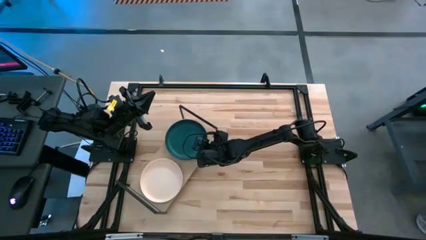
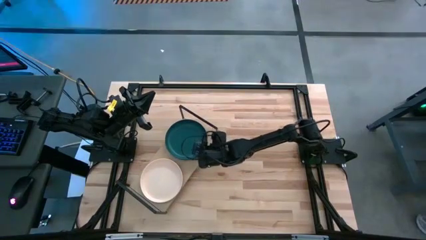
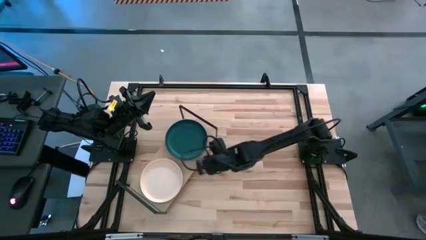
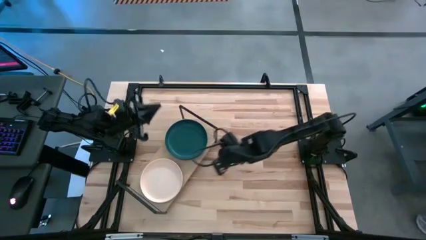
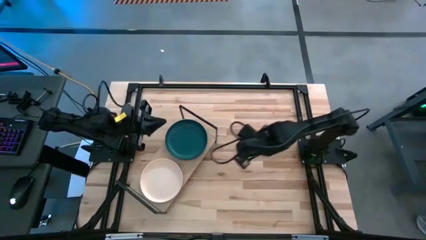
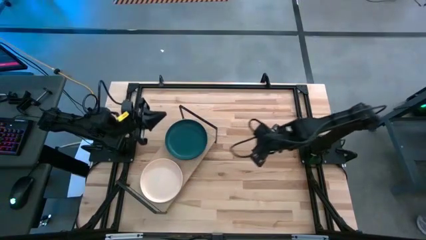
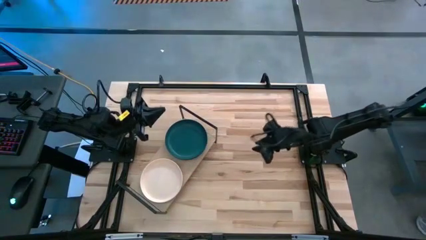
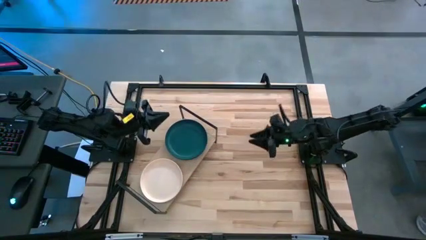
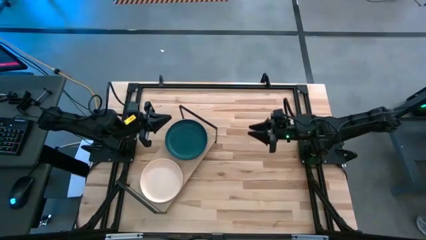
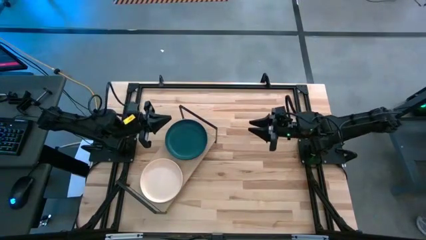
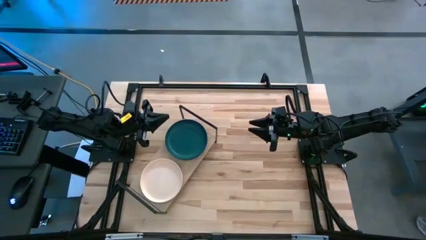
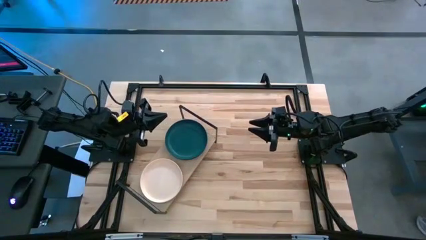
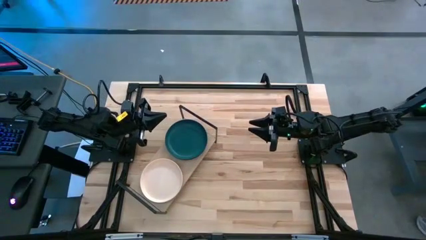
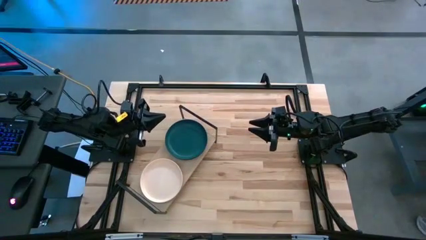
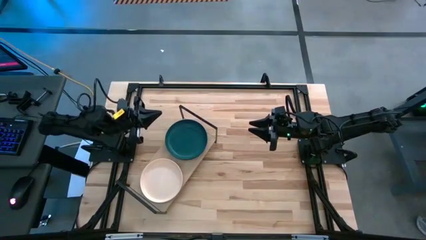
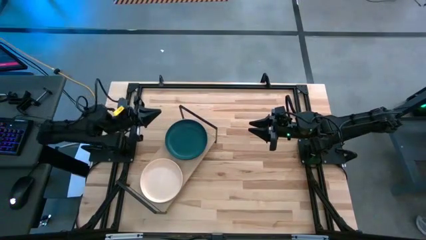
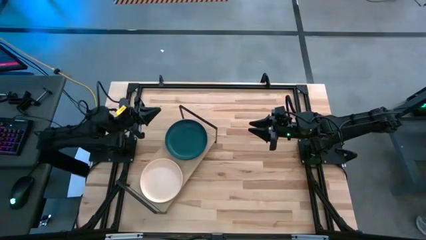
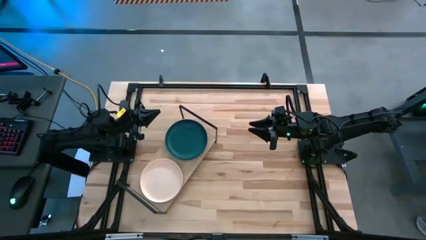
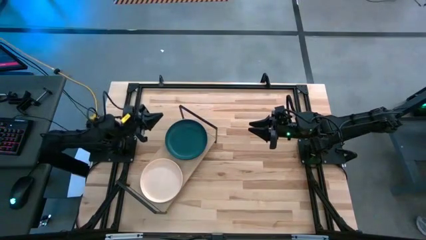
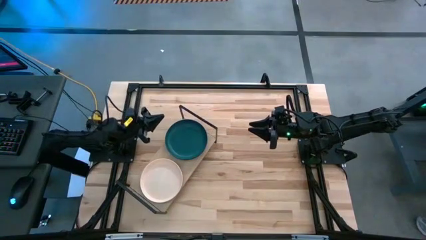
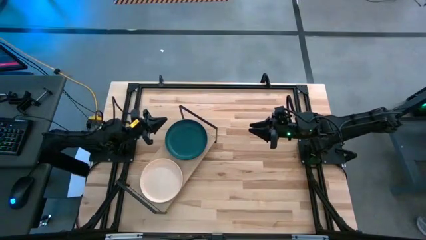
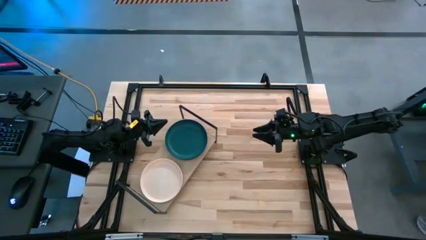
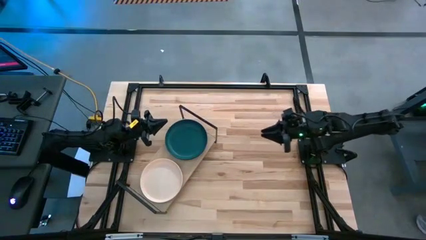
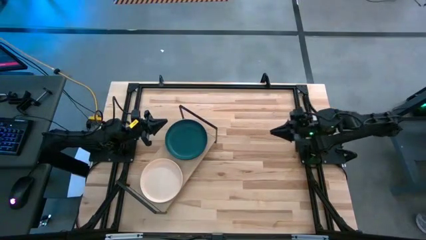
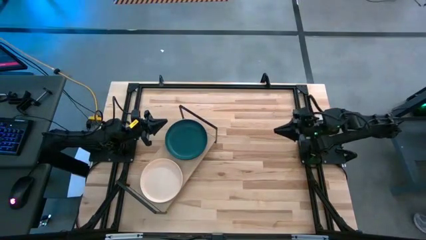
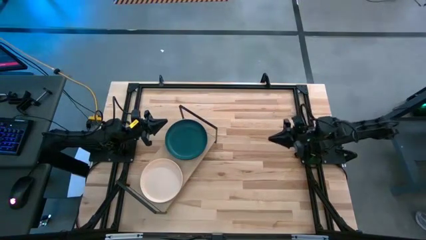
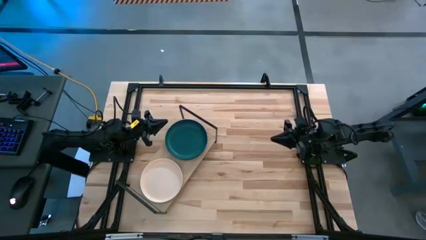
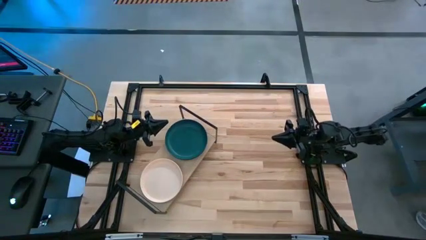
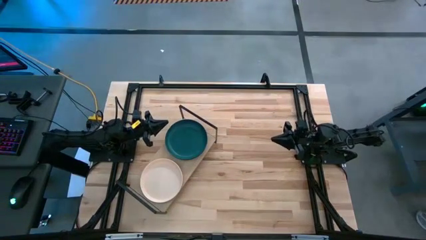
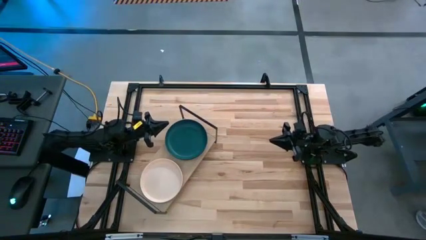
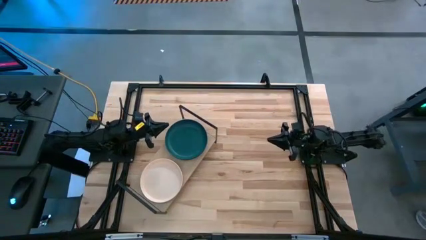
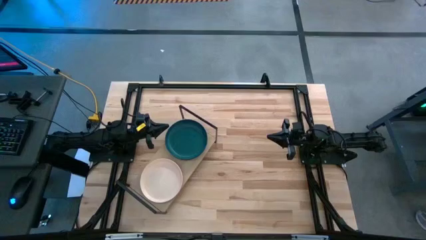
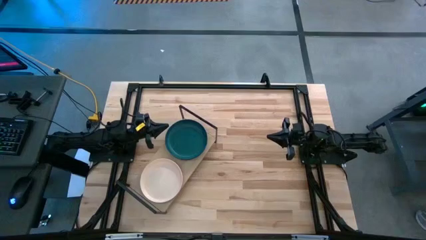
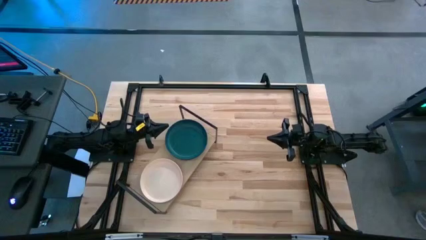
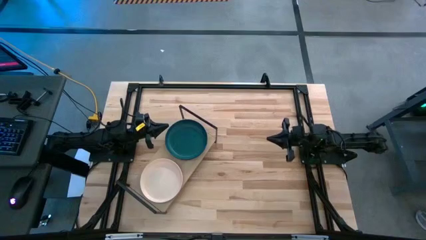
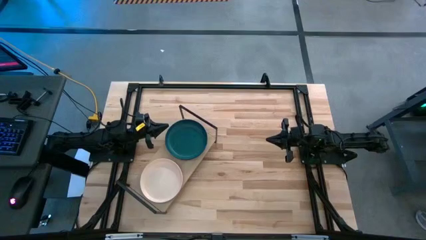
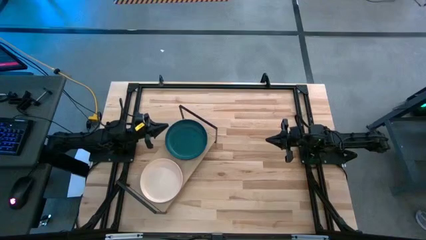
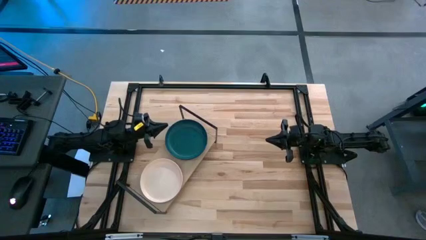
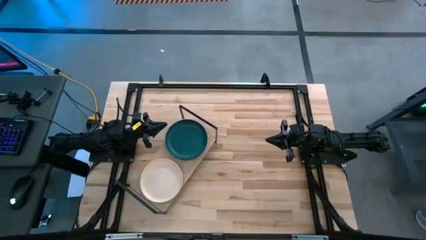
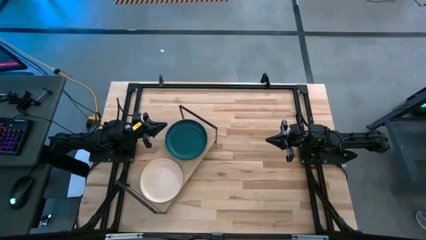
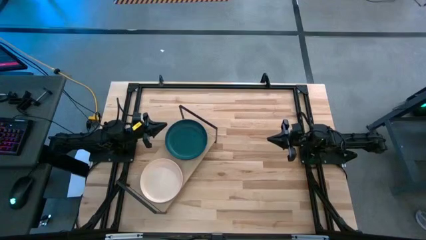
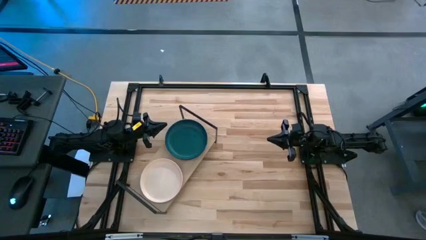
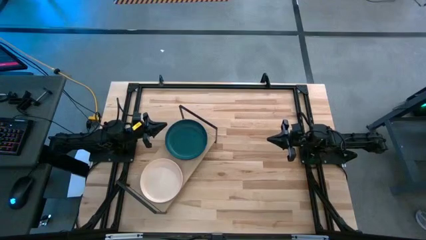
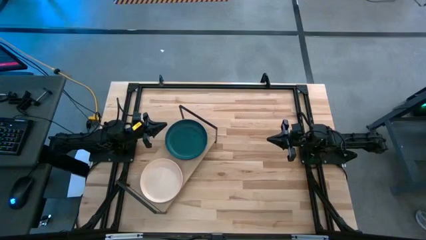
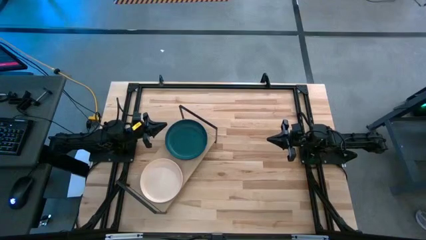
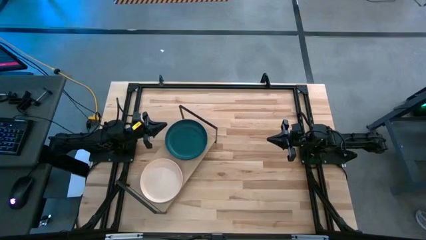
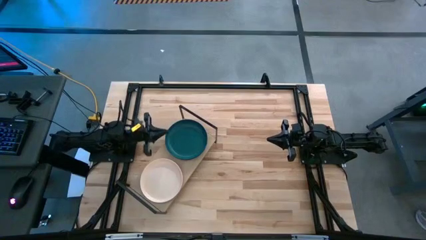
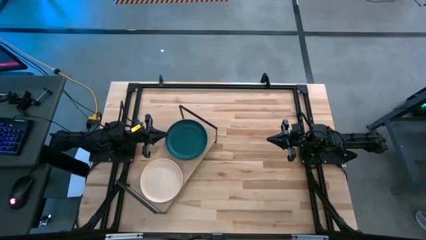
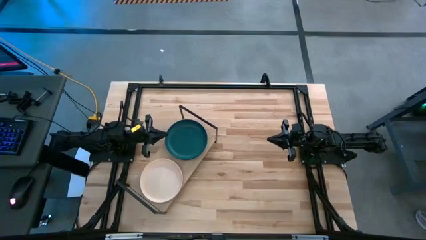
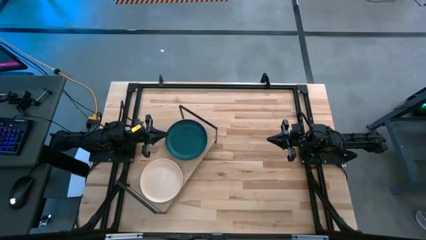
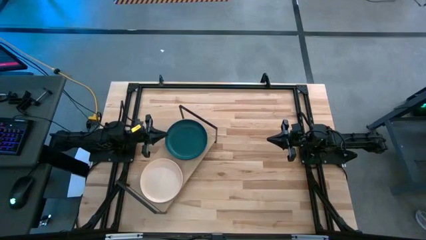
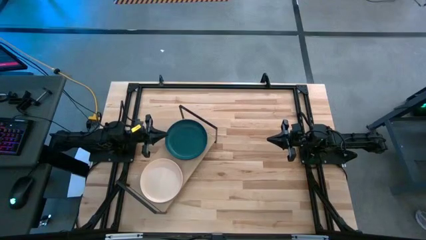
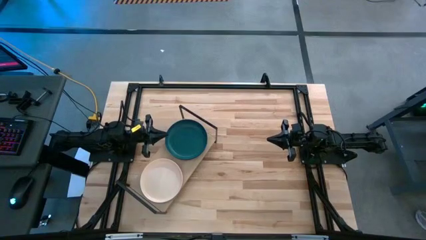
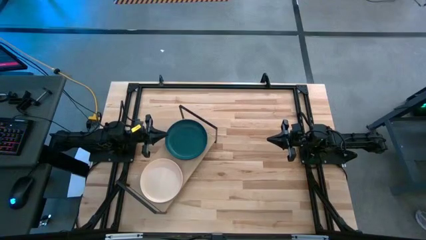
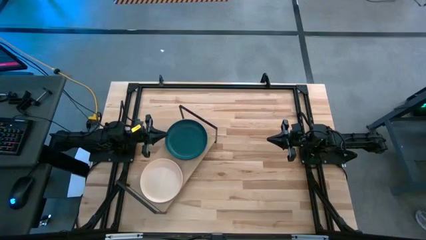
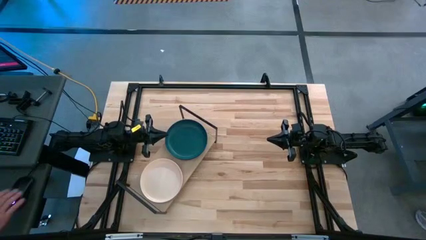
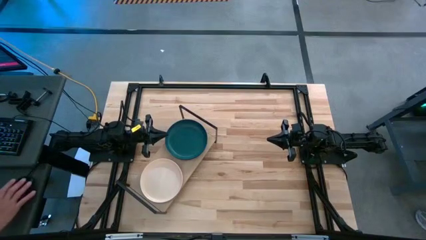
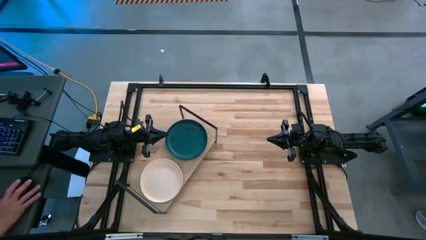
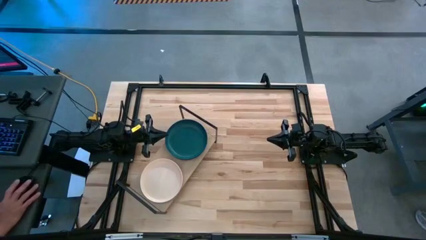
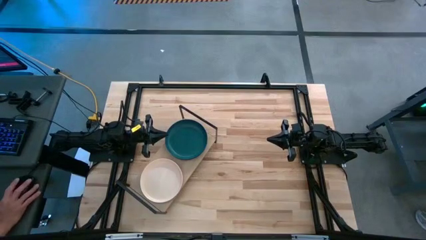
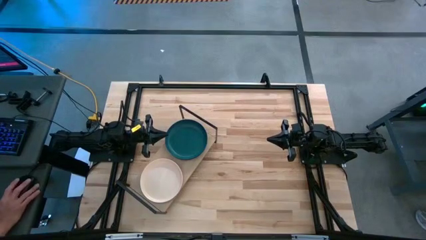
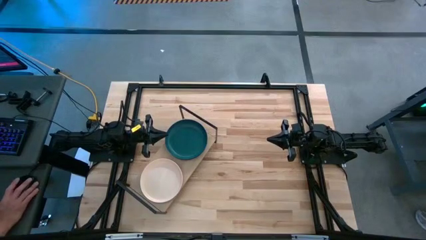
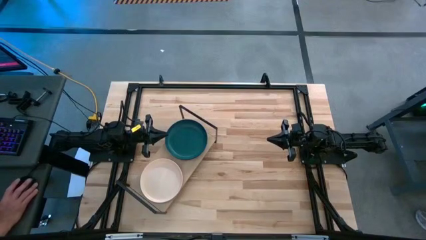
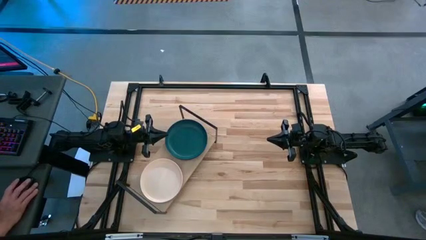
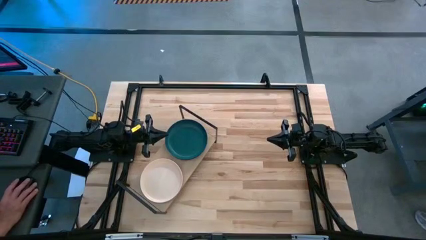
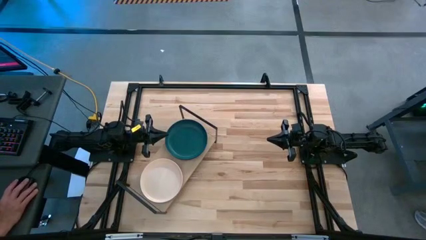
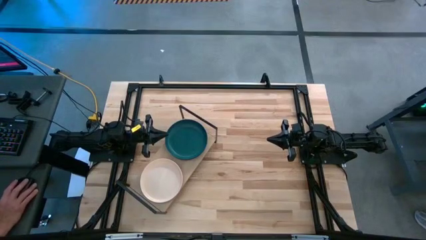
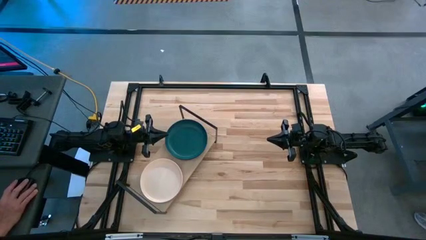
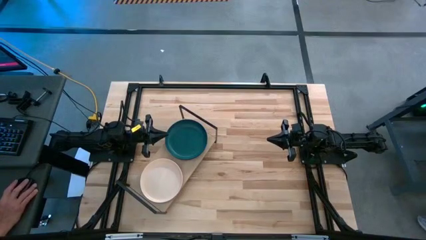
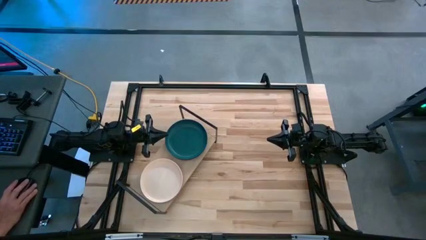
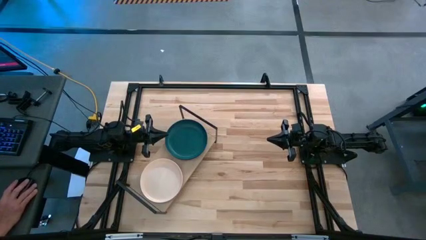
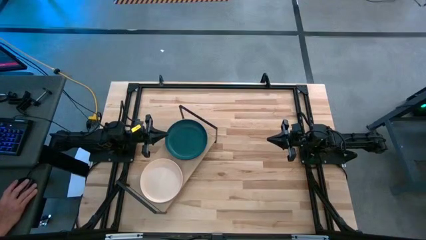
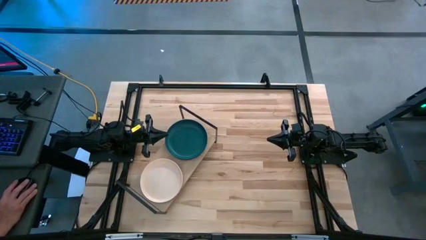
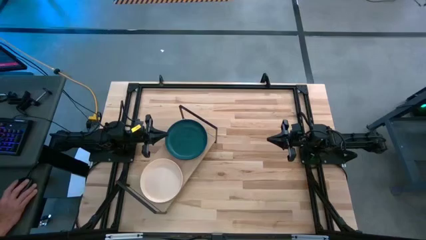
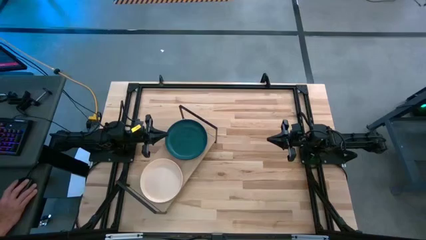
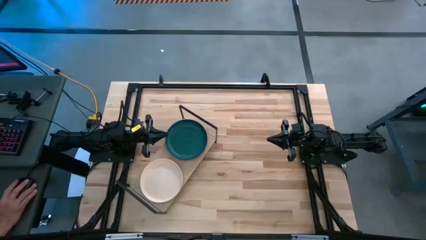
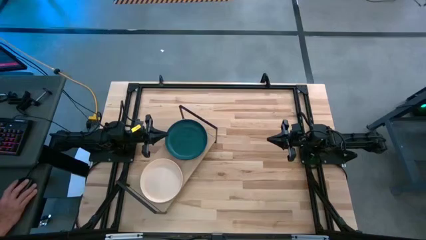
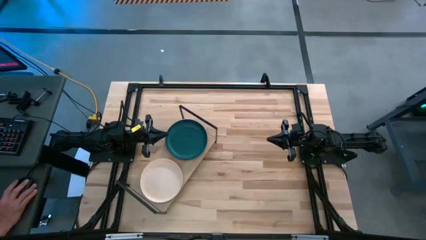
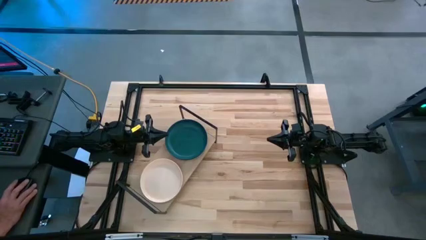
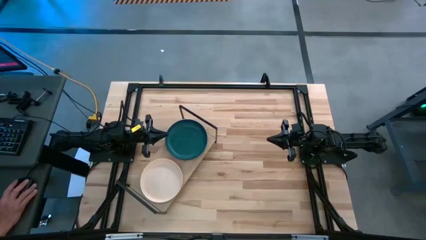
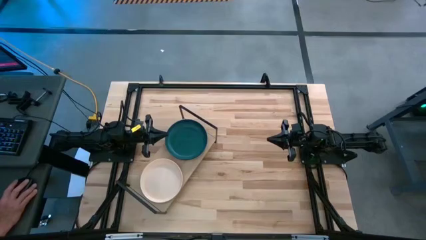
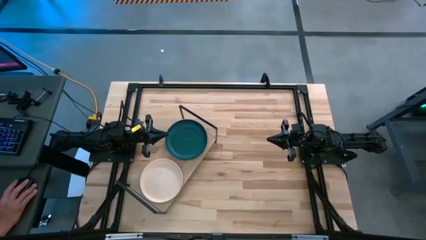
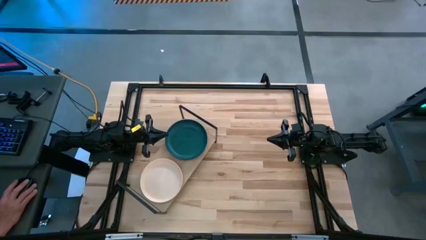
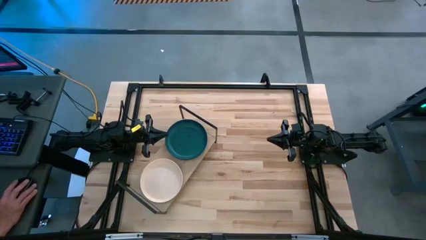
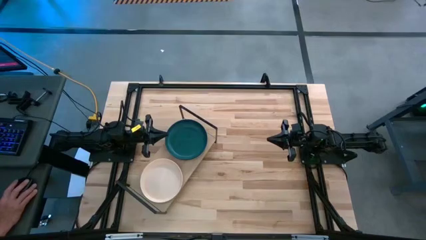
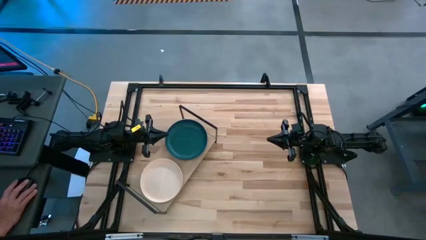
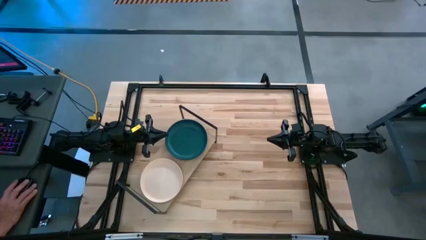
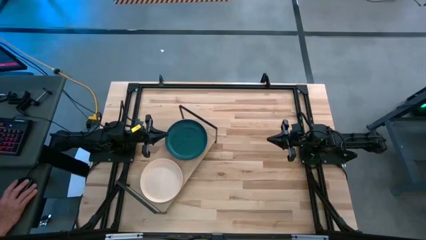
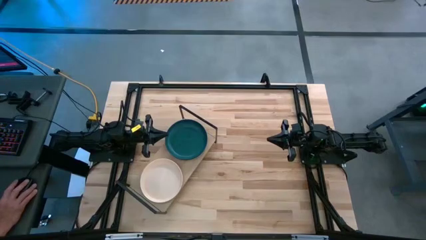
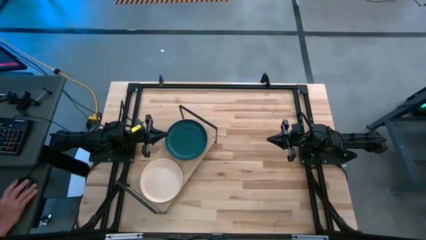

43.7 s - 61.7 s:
Task: Place and stack plates onto a shelf
Return to Home Position
